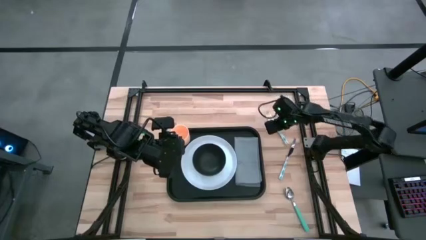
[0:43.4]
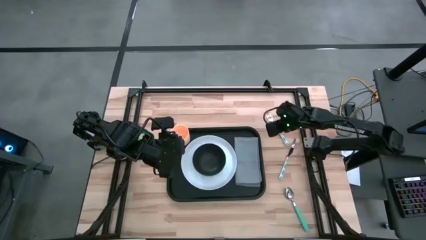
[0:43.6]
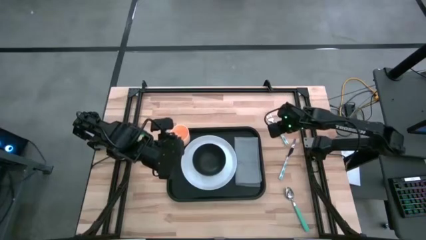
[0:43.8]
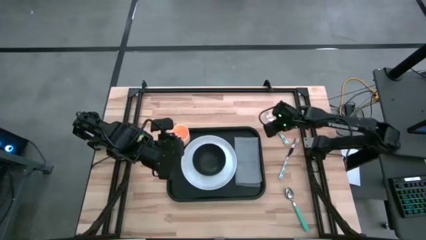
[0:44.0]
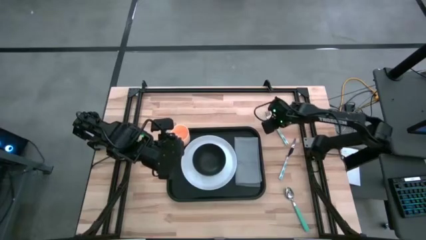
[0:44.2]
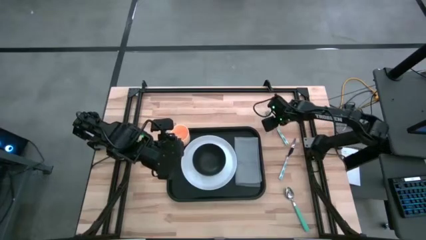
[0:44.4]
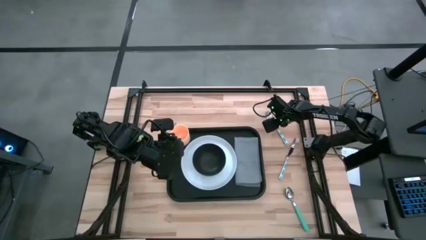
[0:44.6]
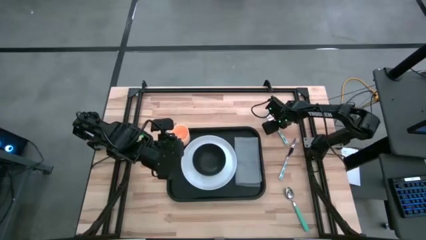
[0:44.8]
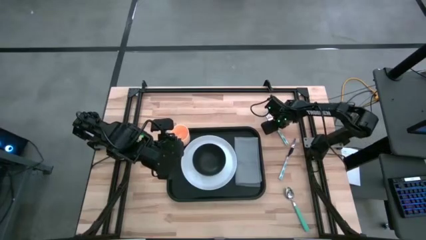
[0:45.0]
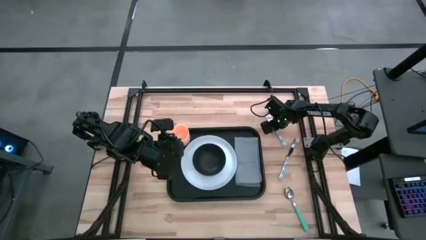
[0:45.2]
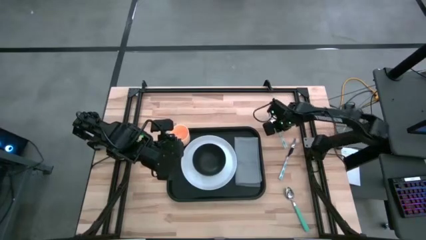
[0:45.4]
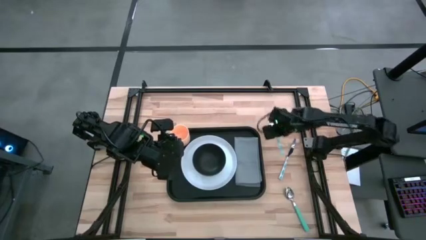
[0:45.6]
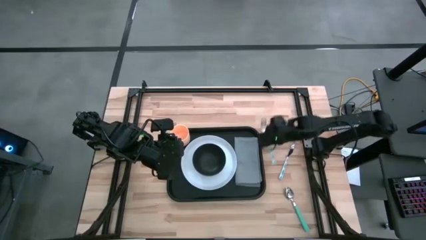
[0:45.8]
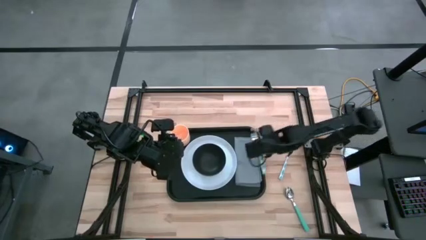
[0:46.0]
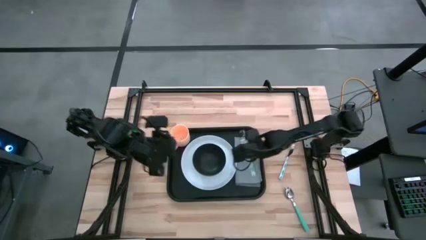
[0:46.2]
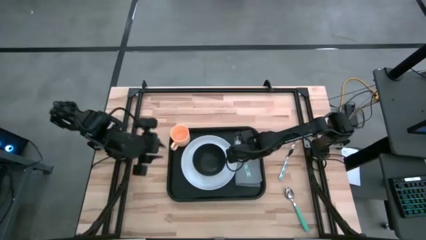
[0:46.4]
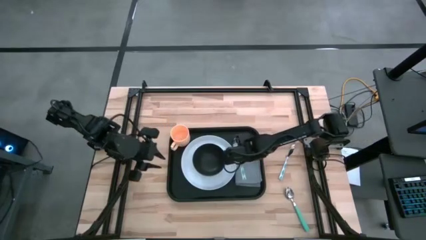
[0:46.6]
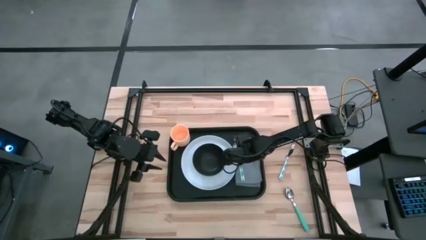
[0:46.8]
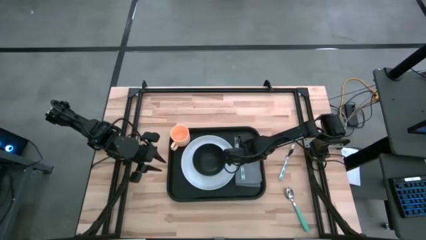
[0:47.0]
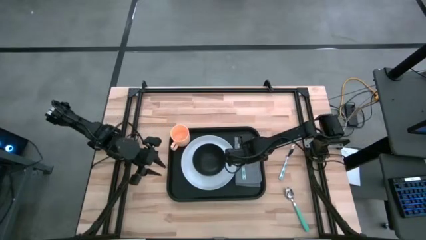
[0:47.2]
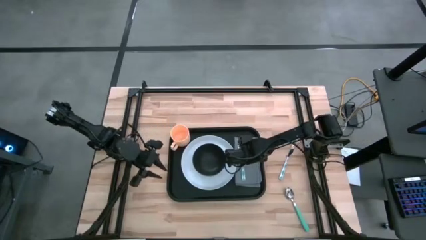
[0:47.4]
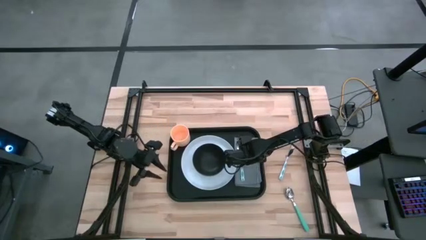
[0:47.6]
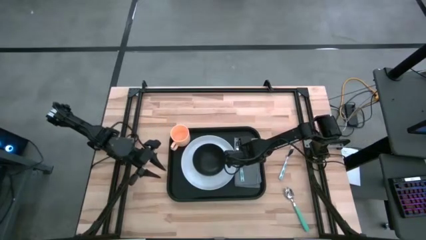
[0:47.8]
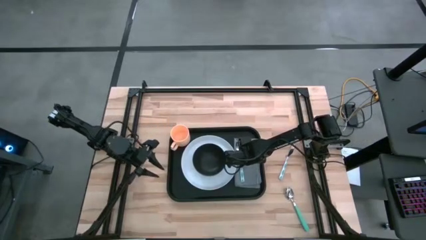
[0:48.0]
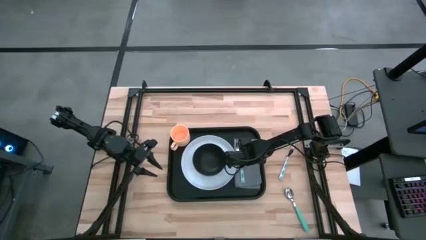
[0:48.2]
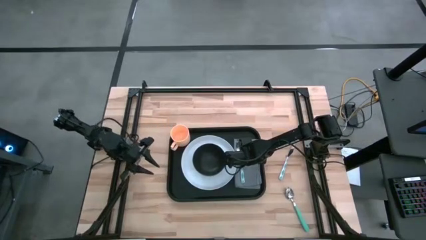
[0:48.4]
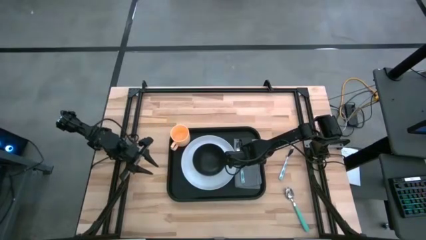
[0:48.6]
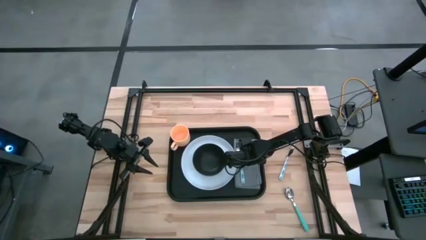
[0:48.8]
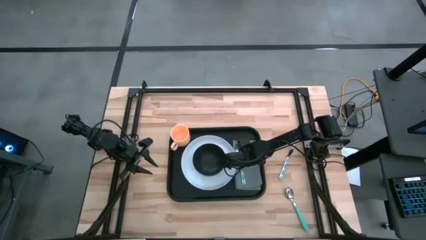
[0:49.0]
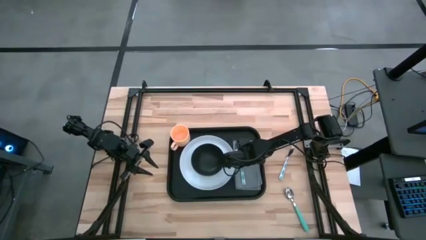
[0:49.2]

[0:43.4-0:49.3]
Task: Set up tray
Put the blue fork on top of the gray table napkin

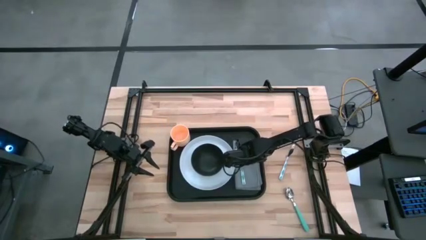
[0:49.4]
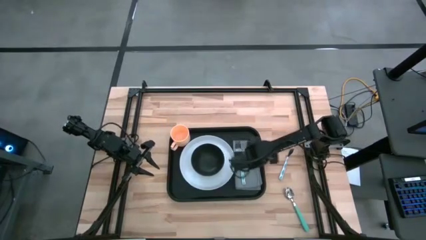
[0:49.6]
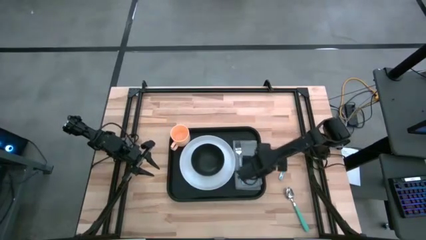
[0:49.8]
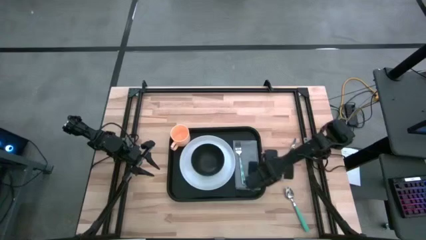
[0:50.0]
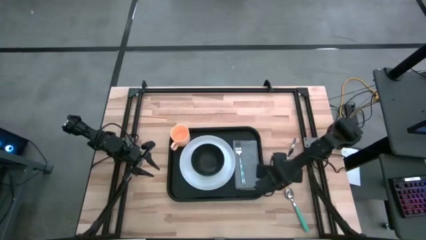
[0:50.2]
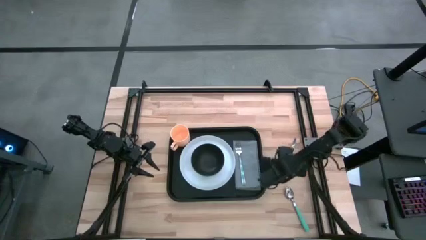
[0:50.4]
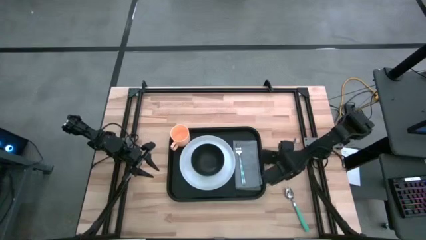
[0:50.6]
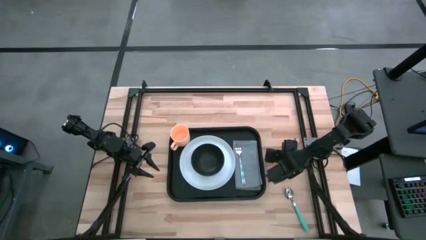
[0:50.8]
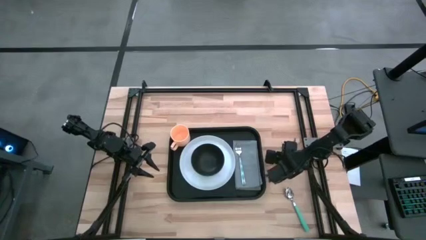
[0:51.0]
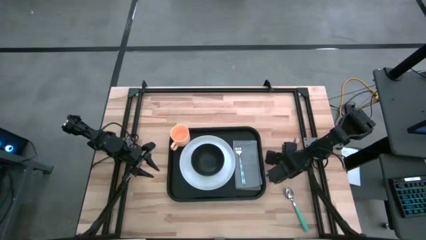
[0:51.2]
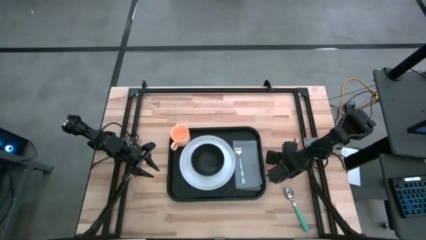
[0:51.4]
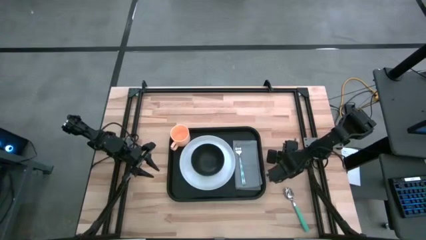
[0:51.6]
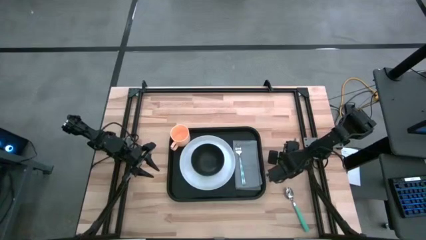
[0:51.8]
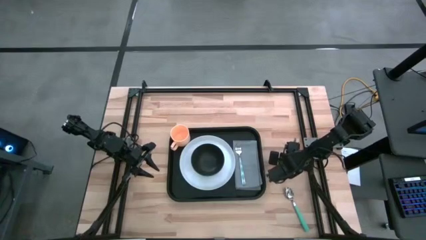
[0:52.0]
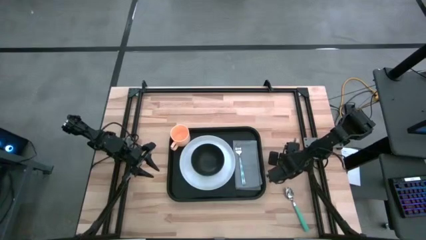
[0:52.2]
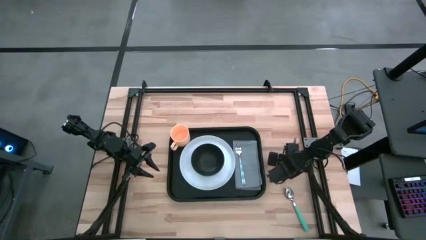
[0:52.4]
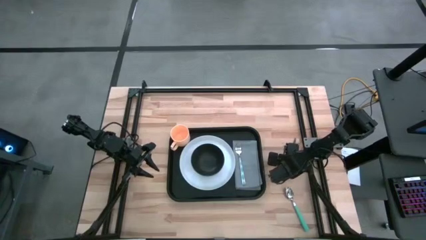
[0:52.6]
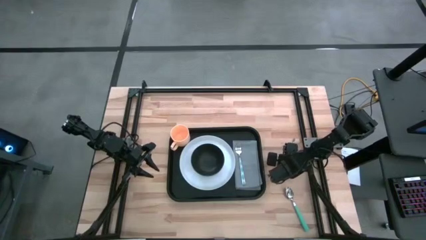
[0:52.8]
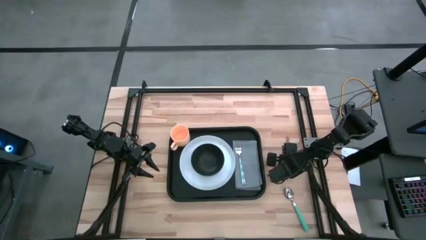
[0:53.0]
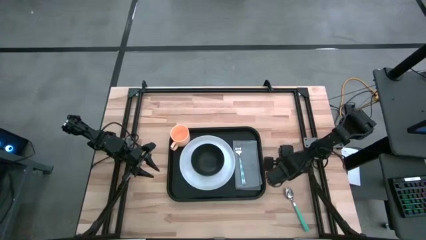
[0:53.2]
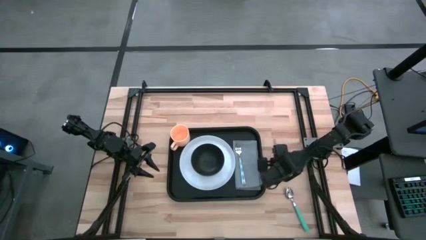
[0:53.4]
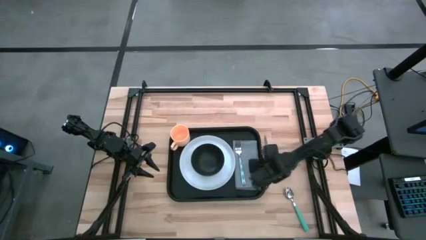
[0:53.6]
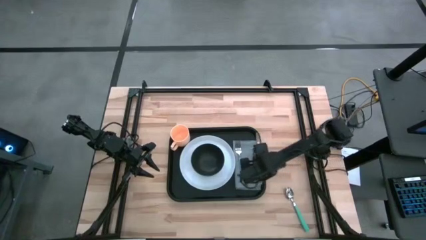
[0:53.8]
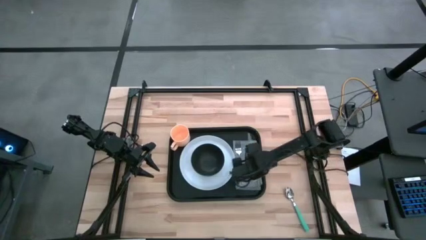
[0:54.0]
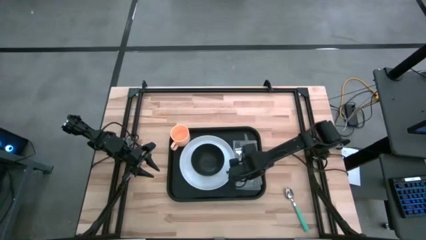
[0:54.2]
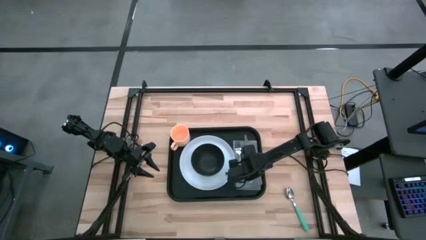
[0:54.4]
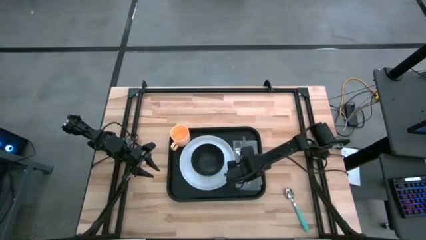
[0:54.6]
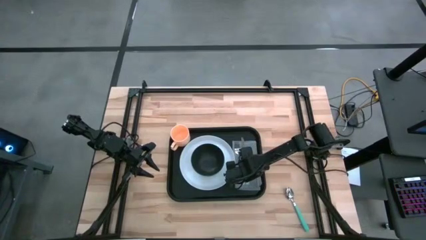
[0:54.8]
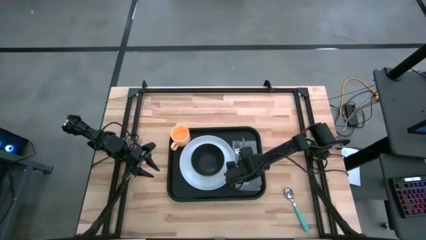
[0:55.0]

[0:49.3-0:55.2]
Put the blue knife on the right of the fork on top of the gray table napkin

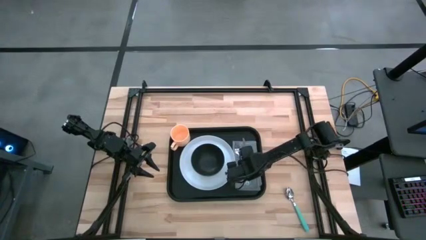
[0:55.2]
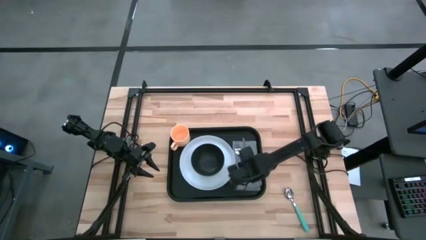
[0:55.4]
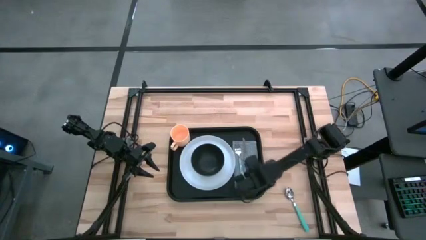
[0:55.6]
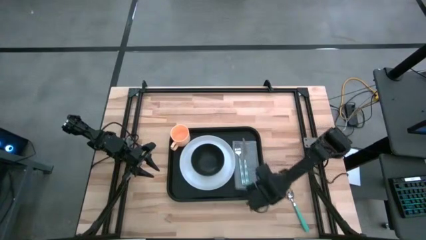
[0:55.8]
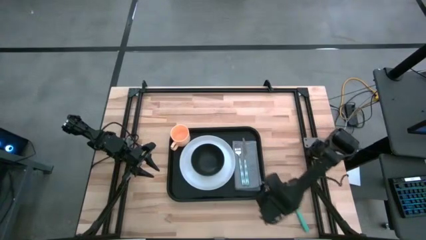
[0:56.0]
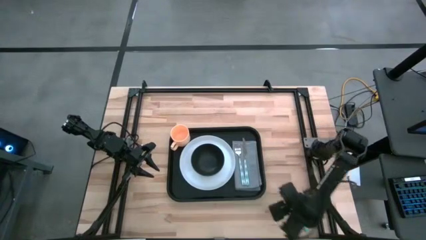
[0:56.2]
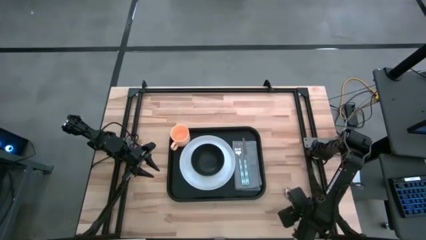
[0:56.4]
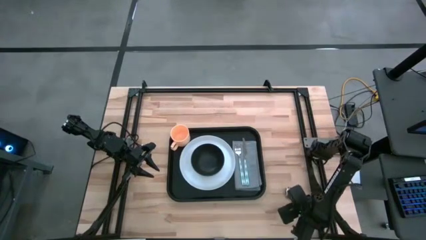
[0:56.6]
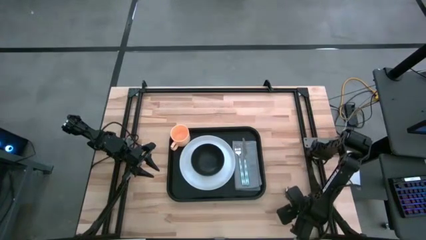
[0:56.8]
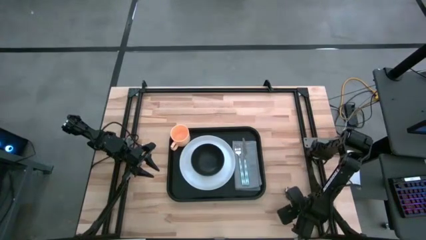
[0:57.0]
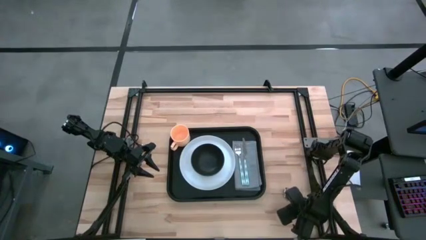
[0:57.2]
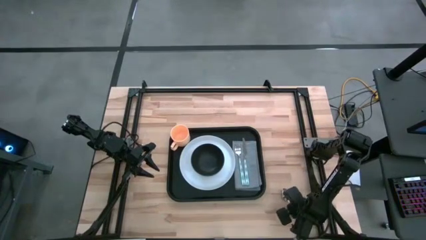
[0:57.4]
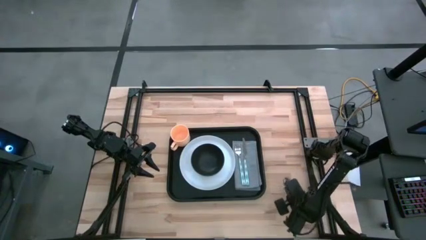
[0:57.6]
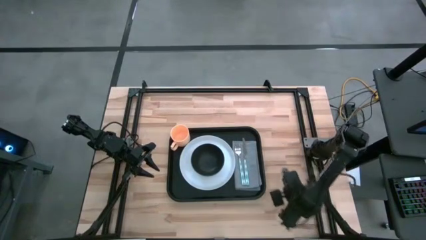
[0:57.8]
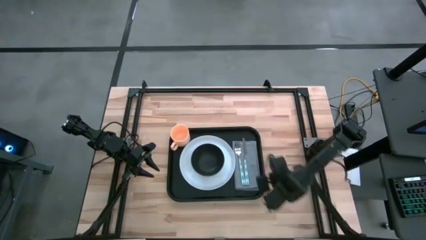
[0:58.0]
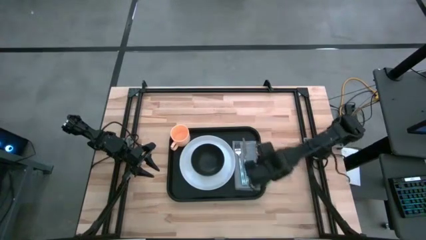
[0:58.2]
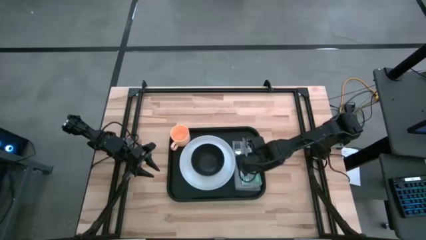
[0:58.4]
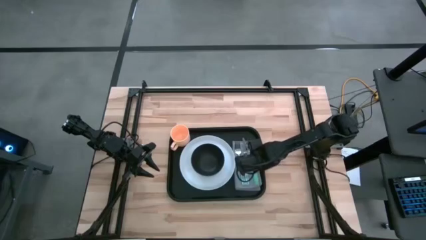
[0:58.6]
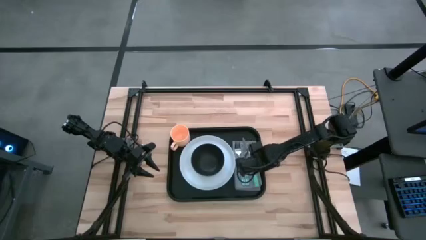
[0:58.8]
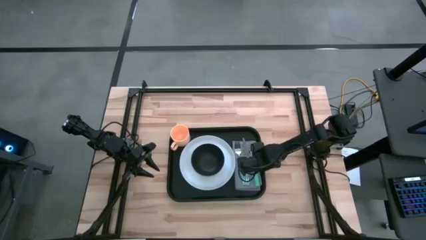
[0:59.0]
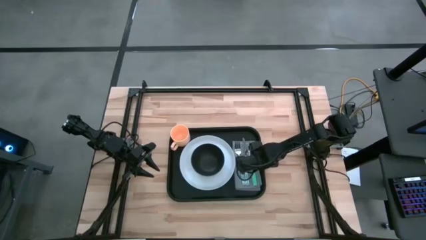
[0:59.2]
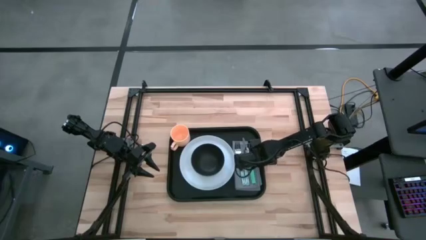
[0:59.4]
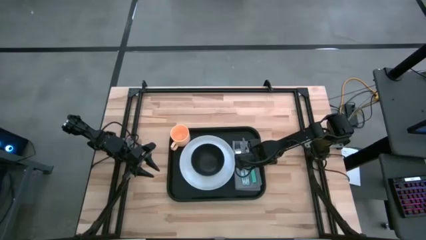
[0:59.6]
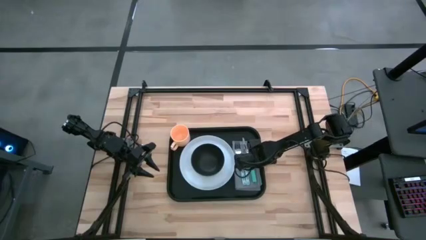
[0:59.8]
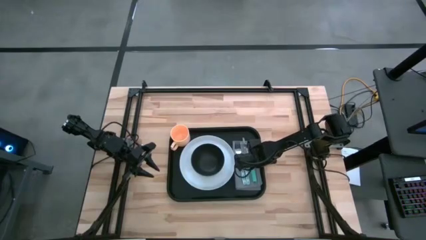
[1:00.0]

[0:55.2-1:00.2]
Put the light blue spoon on the right of the knife on top of the gray table napkin
